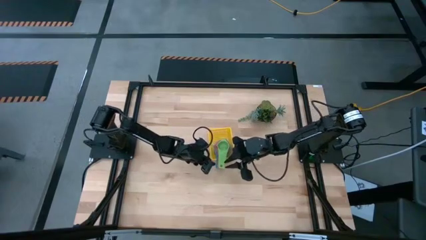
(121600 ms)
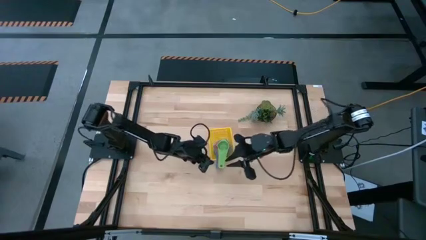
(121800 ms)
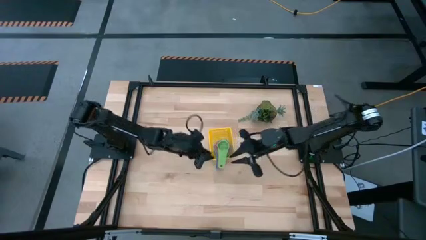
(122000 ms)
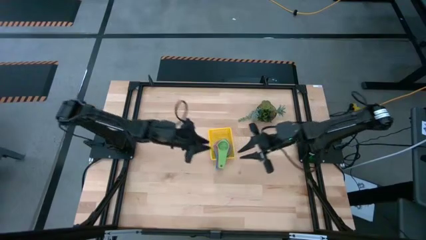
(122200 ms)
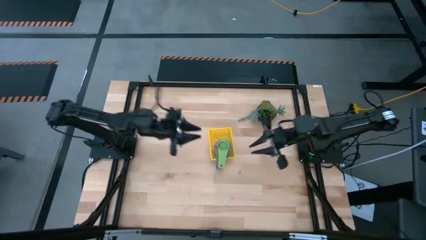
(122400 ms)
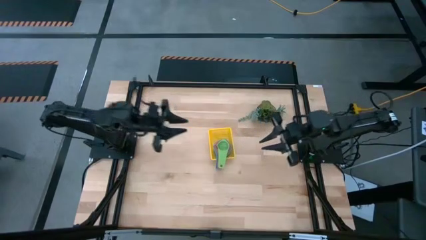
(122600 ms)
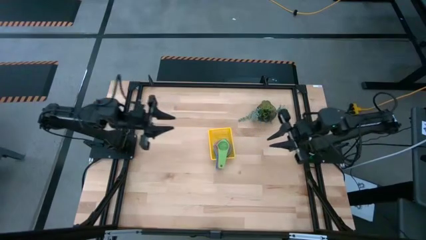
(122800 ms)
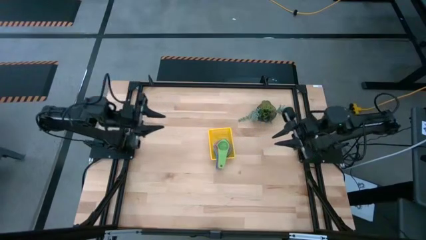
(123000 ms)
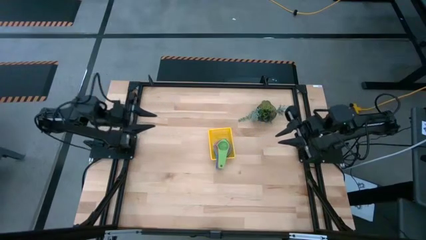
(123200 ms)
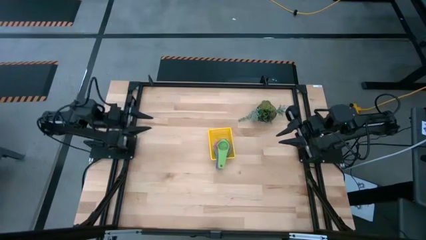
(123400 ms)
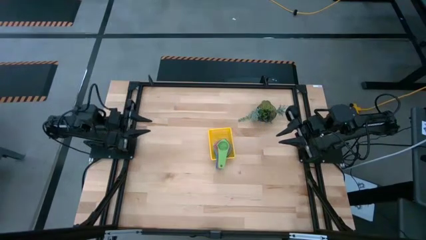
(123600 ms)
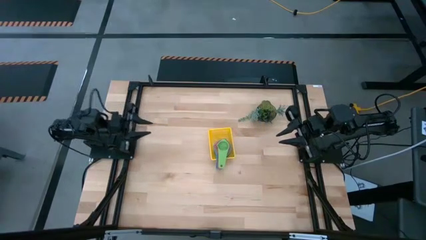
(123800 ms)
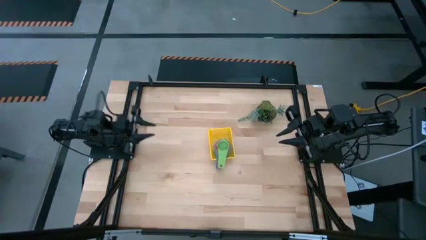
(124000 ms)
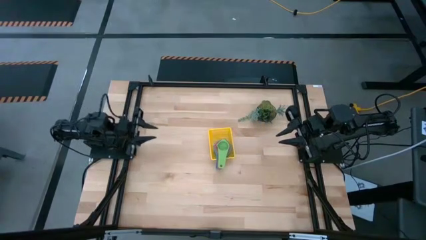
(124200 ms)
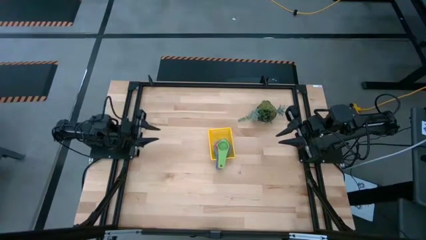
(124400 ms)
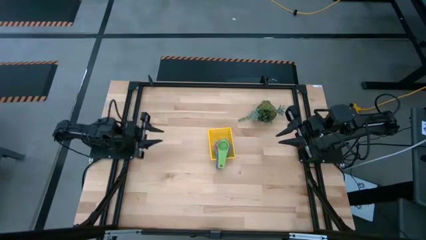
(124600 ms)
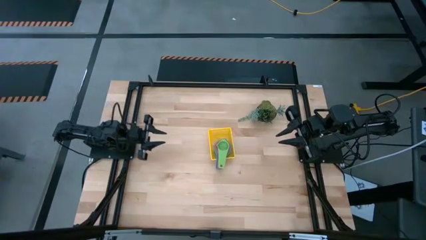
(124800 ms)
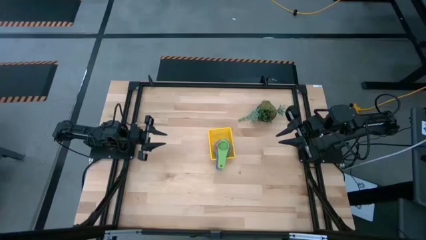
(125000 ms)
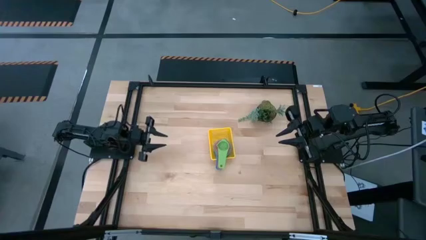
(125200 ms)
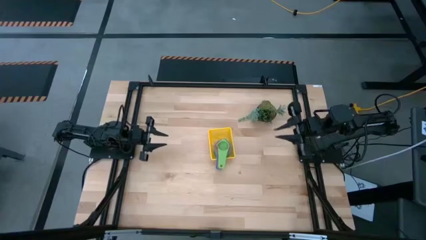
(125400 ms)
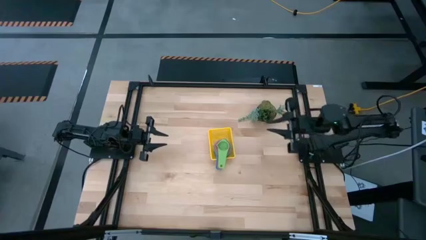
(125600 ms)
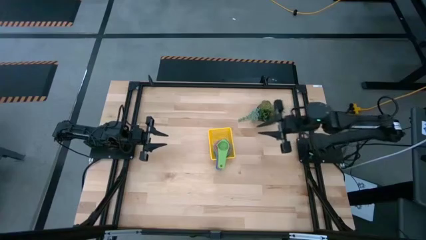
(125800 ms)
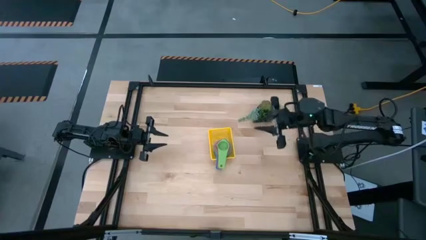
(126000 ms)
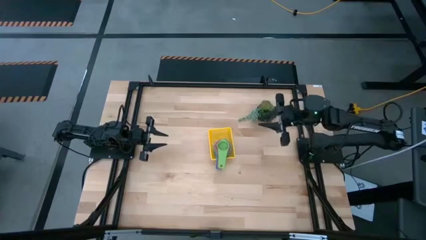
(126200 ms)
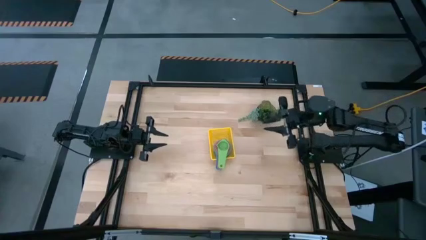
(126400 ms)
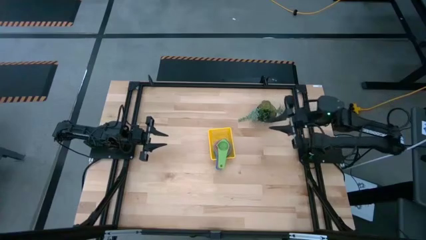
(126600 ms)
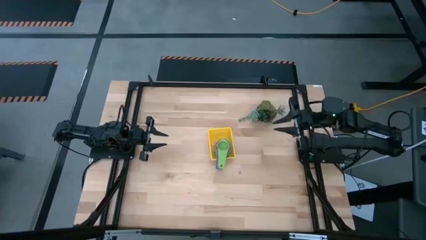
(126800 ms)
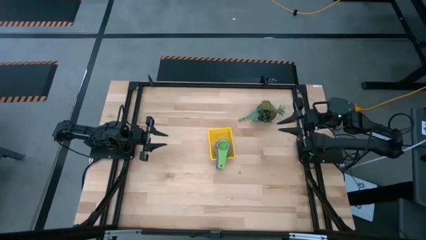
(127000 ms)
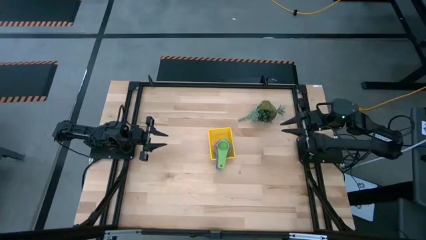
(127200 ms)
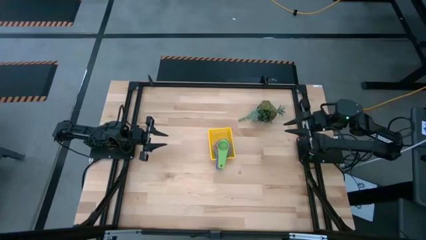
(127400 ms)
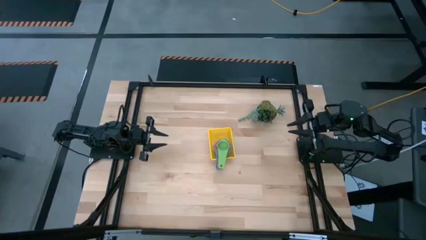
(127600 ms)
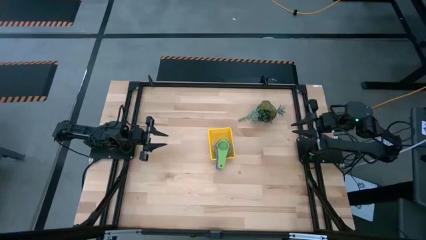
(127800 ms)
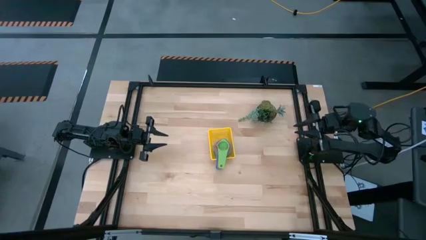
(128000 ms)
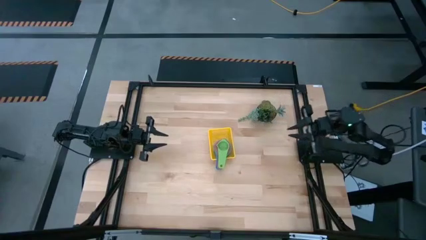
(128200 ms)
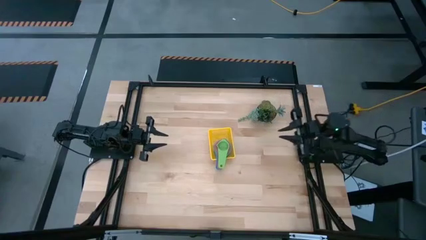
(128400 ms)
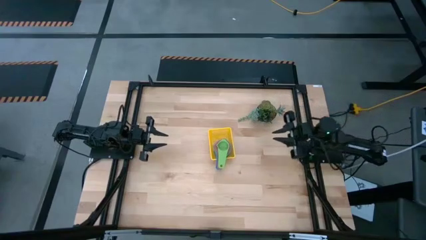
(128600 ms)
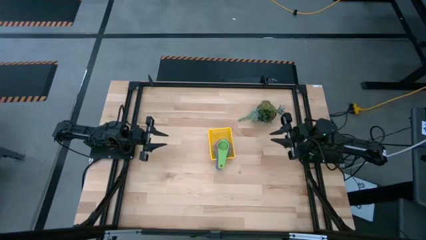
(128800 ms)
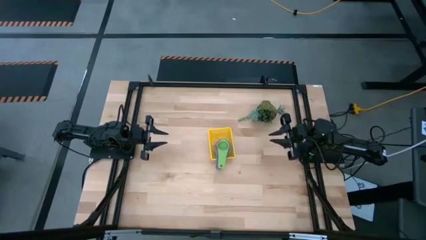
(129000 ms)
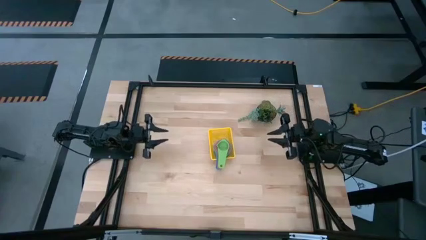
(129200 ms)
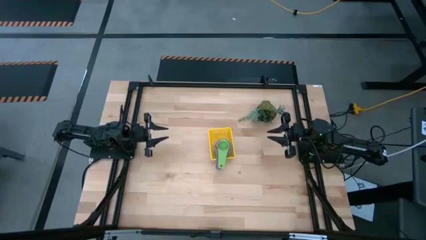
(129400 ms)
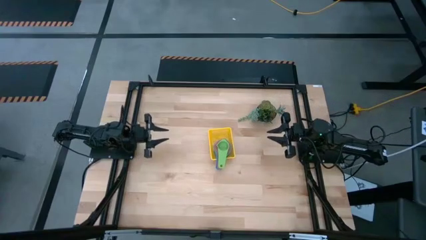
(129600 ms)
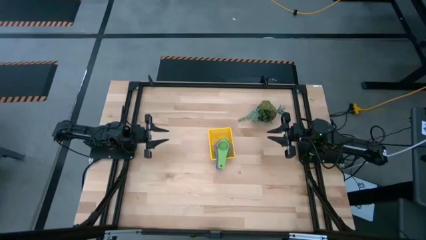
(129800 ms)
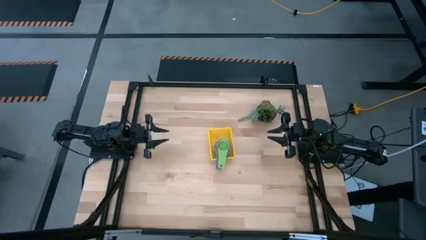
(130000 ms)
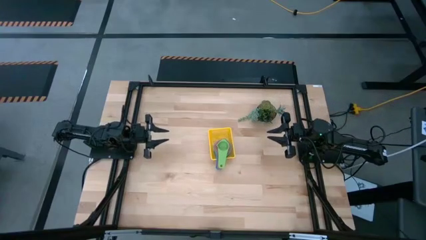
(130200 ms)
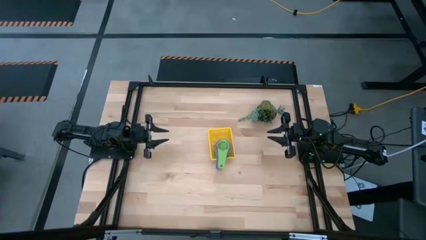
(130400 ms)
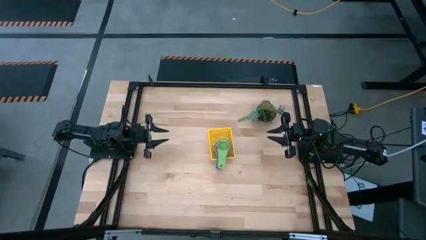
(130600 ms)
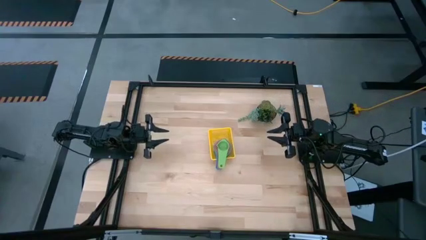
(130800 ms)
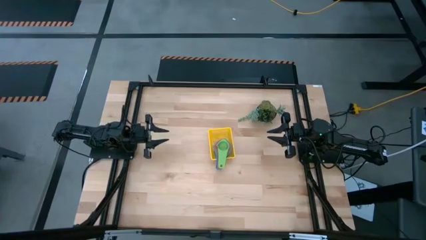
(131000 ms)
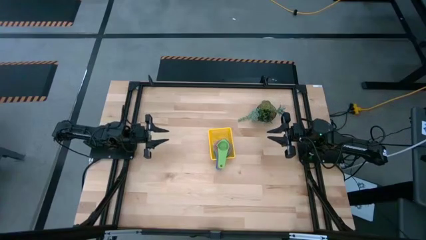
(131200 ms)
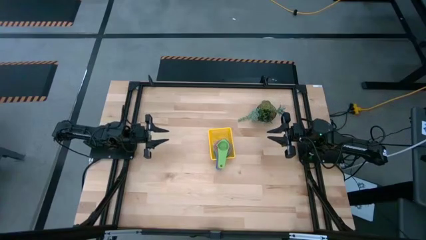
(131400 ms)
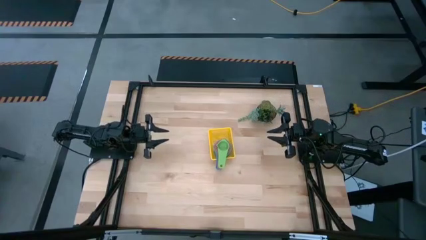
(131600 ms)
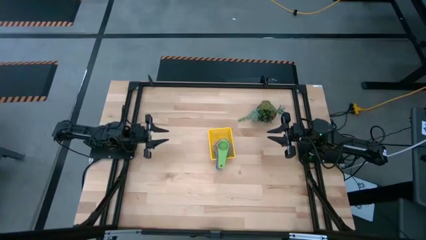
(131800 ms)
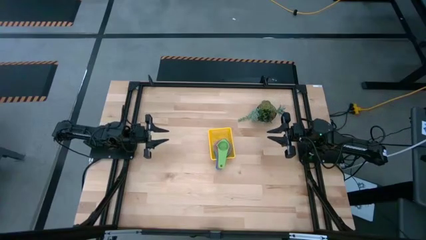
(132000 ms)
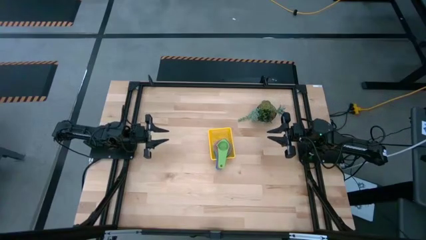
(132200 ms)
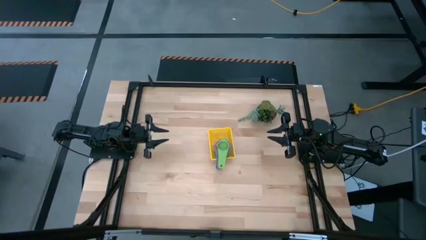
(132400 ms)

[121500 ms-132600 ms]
Task: Nest measuring cups in basket
Return to Home Position

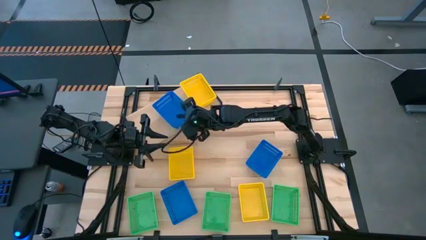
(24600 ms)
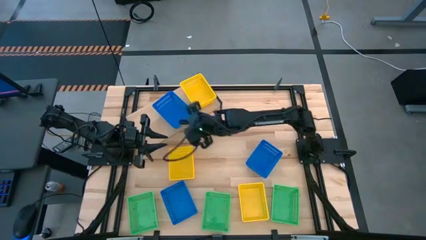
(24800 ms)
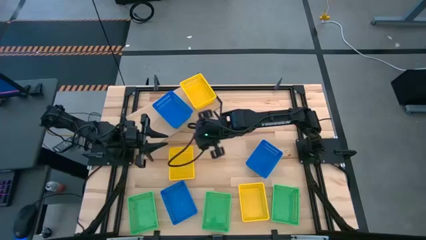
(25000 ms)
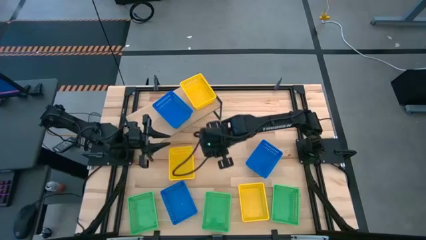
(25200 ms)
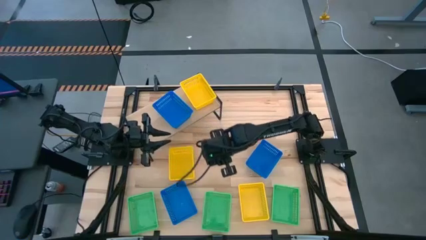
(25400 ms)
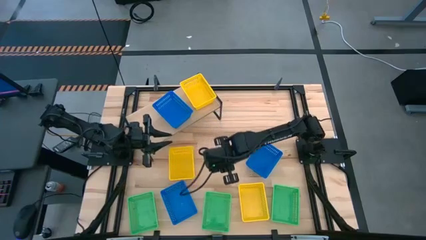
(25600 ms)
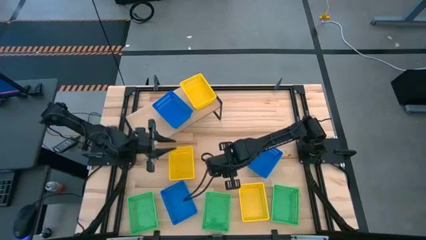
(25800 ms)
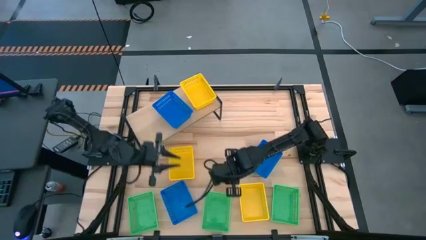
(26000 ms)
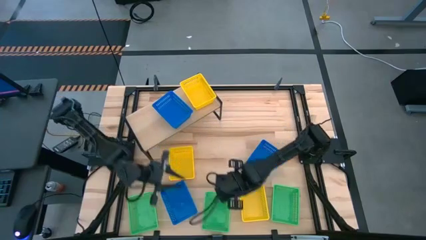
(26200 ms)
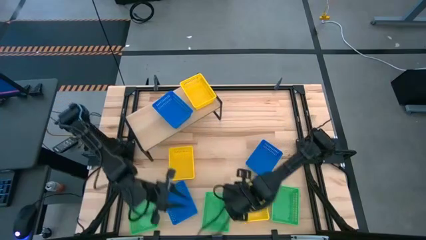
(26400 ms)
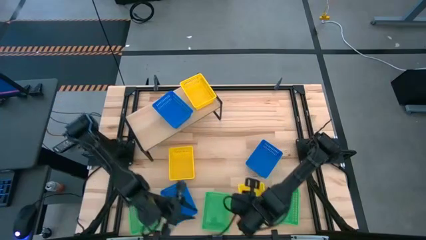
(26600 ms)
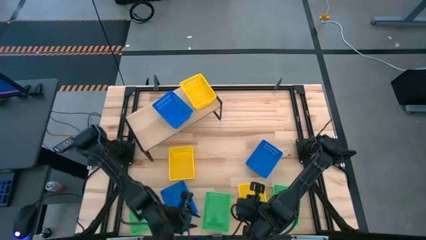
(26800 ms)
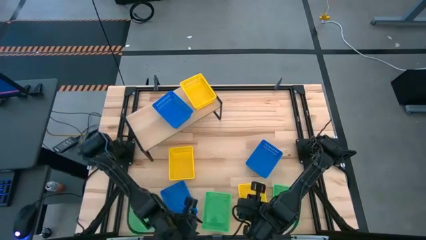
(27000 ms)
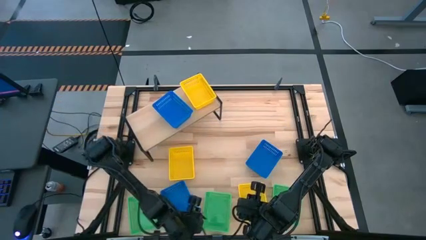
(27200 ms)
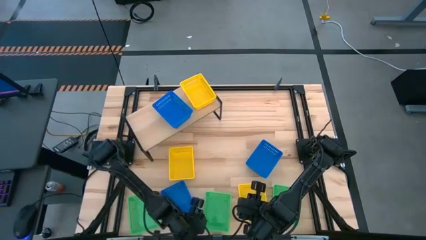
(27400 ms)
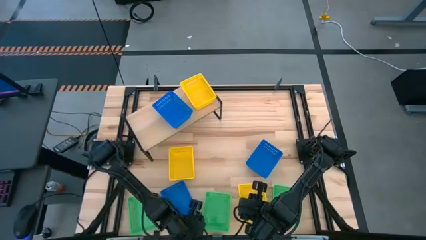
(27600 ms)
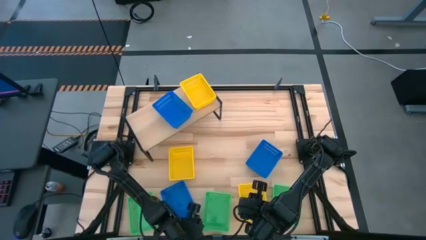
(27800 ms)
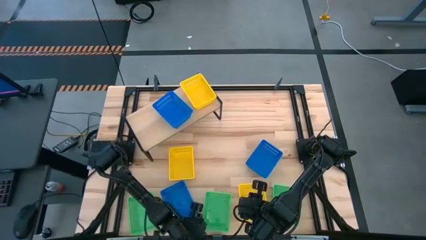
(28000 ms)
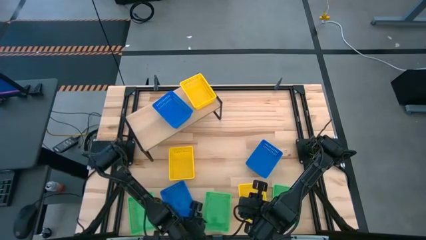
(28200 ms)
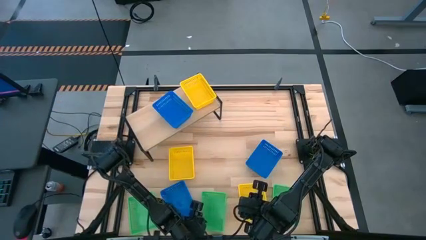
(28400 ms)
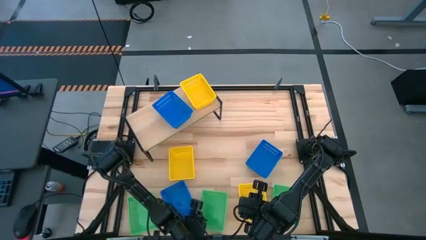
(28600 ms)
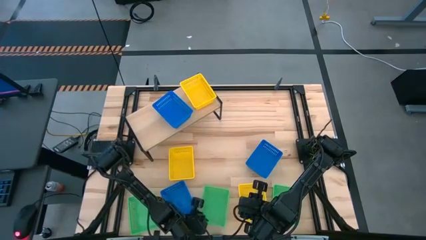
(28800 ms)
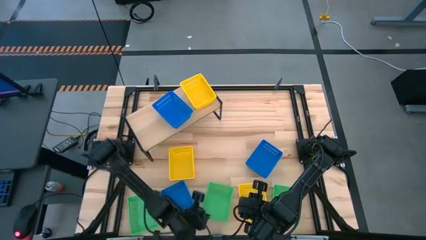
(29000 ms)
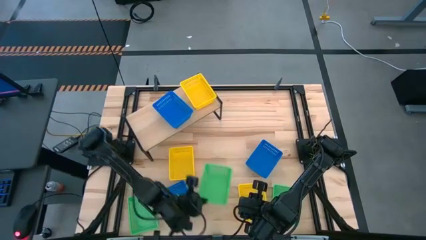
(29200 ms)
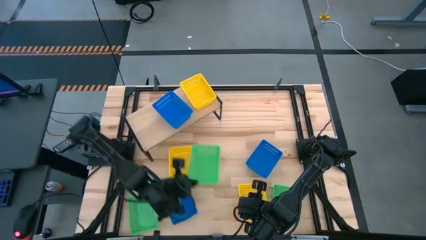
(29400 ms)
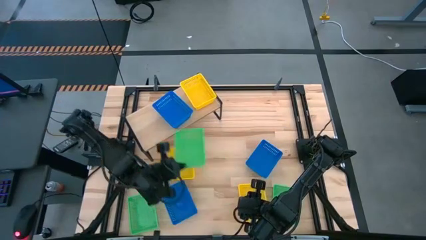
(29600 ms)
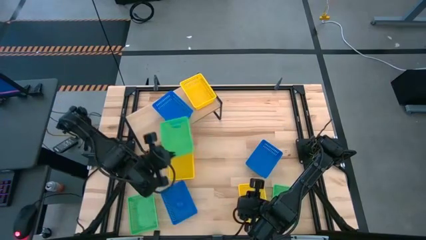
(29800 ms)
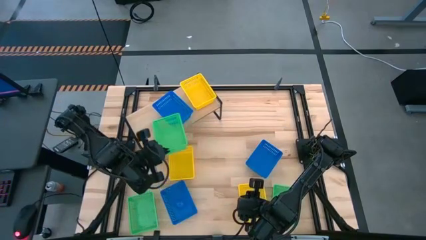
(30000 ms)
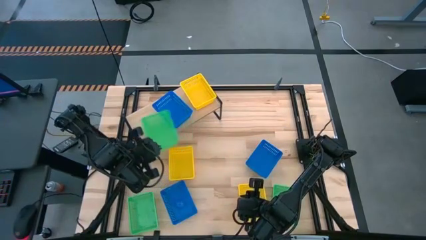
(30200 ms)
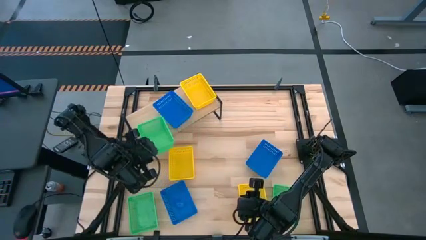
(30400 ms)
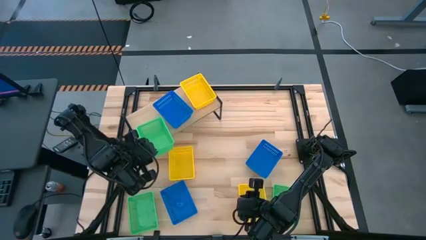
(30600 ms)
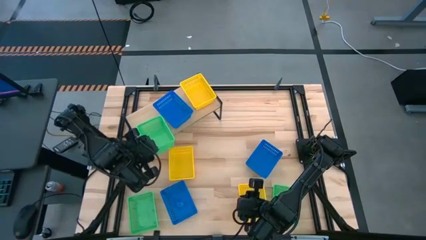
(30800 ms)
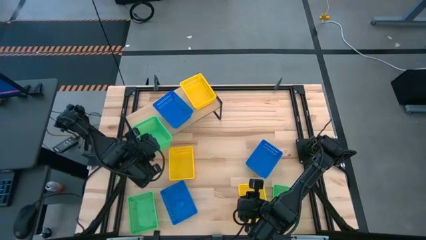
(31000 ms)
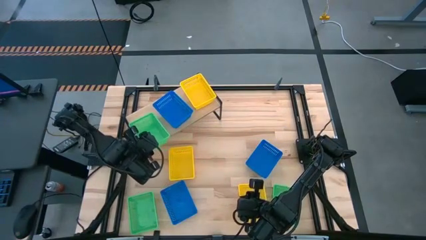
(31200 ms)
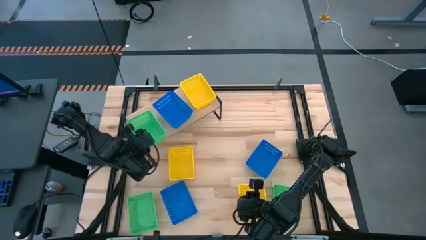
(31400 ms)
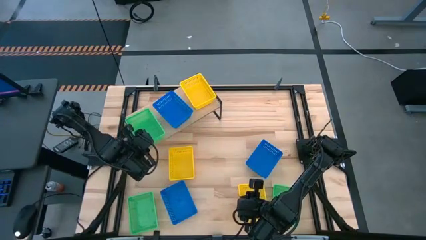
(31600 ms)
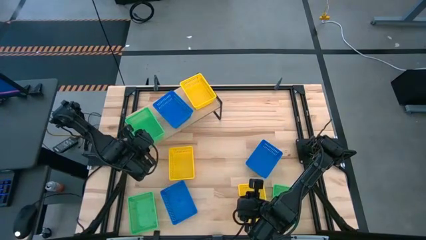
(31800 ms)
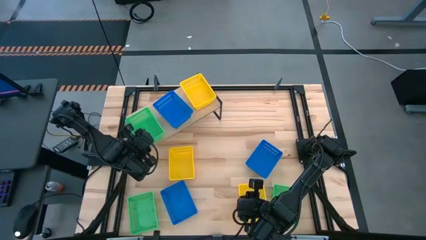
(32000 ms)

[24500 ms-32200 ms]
Task: Stack baskets on shelf by color
Put the middle green basket on the shelf
